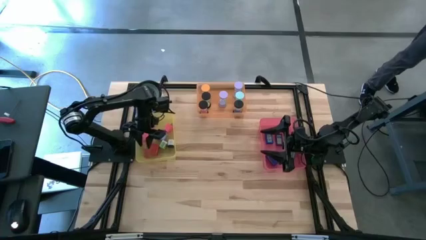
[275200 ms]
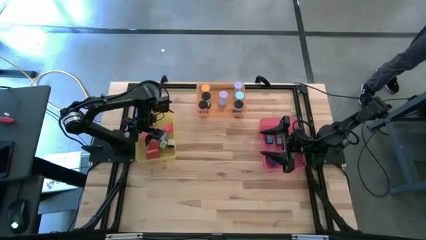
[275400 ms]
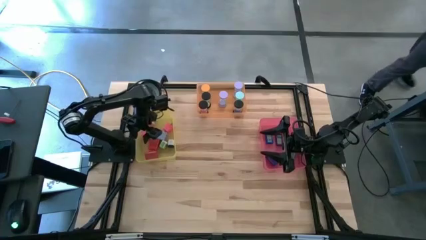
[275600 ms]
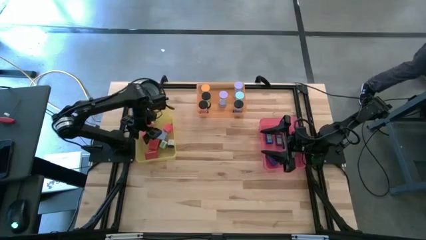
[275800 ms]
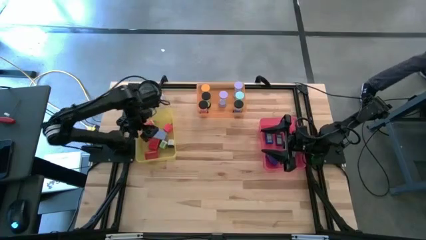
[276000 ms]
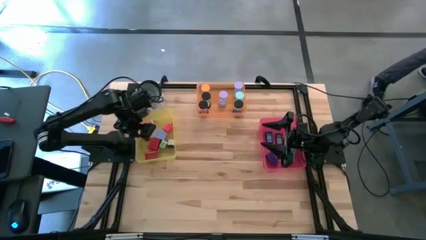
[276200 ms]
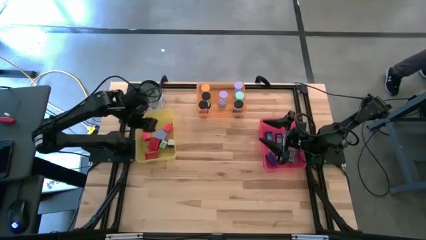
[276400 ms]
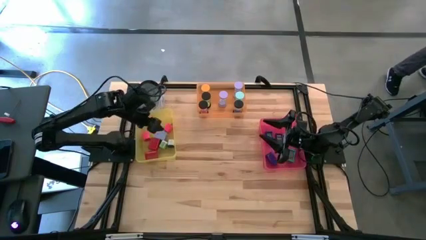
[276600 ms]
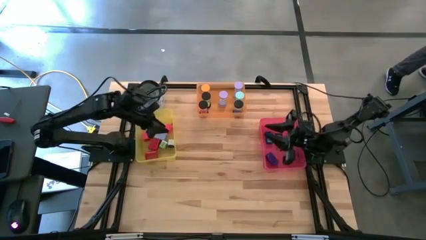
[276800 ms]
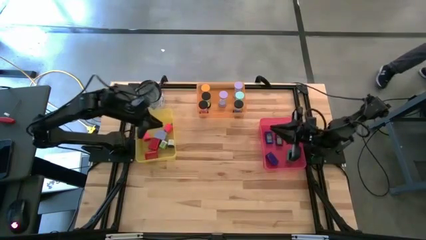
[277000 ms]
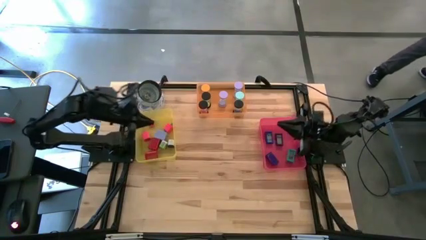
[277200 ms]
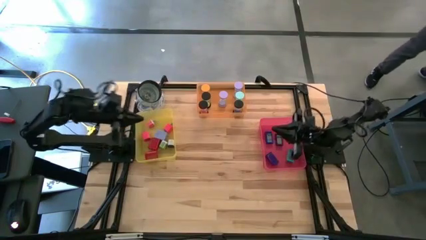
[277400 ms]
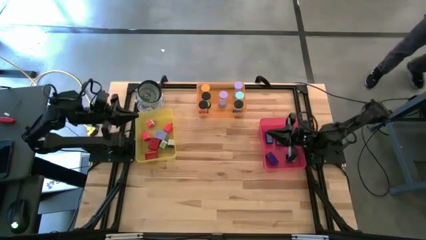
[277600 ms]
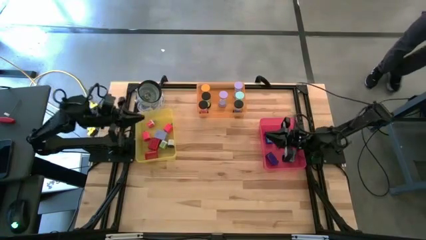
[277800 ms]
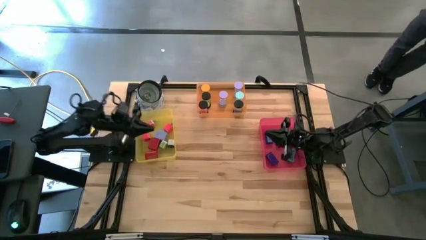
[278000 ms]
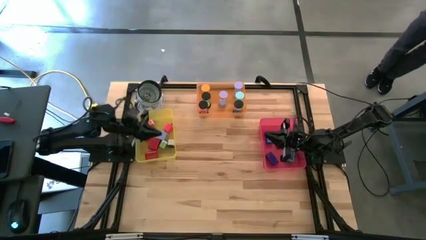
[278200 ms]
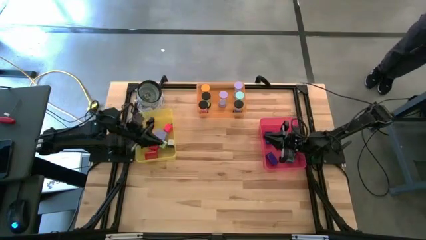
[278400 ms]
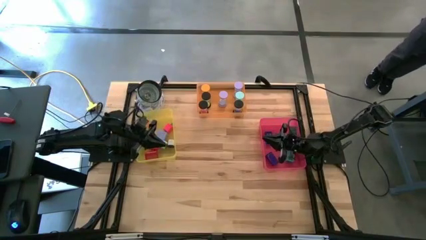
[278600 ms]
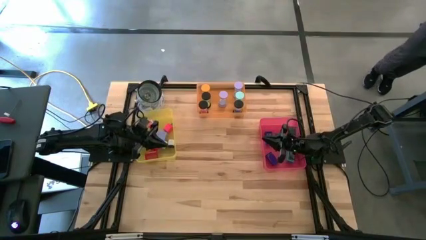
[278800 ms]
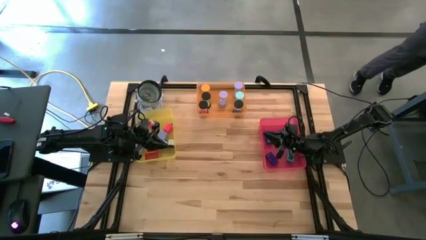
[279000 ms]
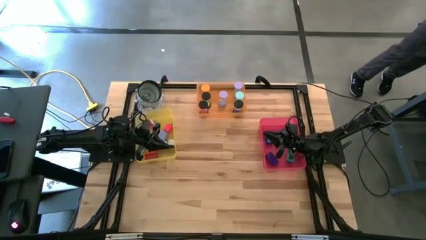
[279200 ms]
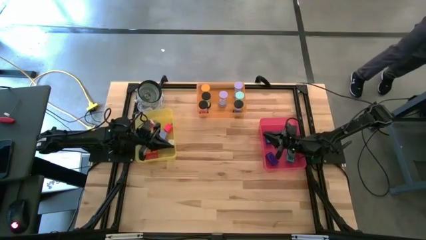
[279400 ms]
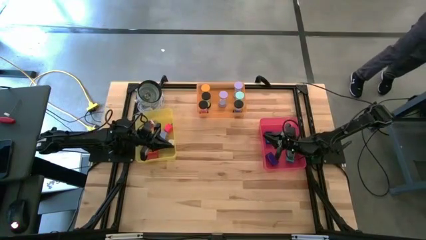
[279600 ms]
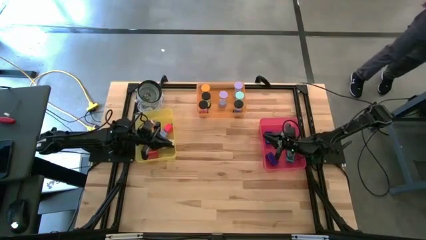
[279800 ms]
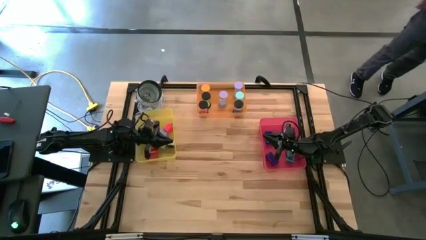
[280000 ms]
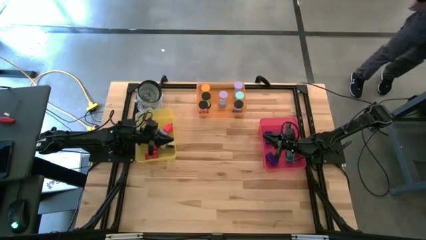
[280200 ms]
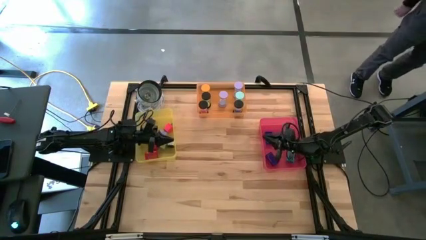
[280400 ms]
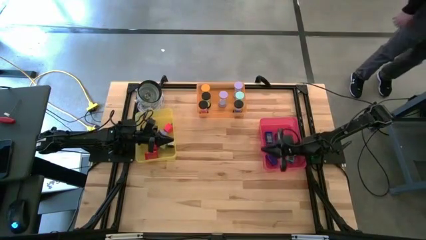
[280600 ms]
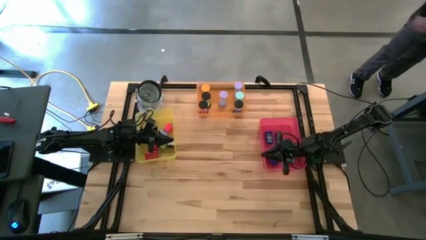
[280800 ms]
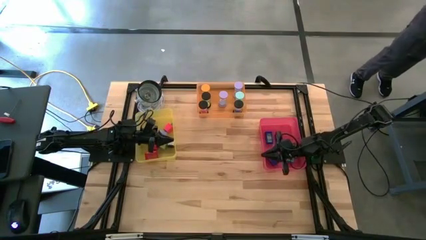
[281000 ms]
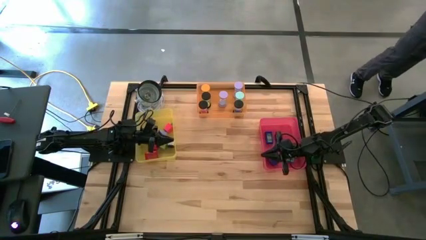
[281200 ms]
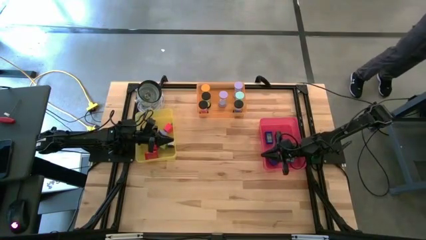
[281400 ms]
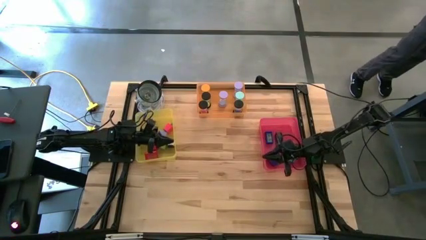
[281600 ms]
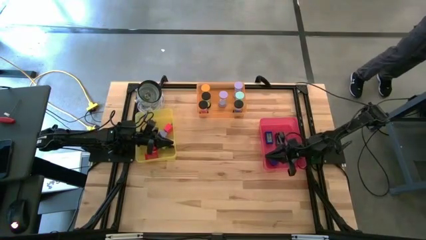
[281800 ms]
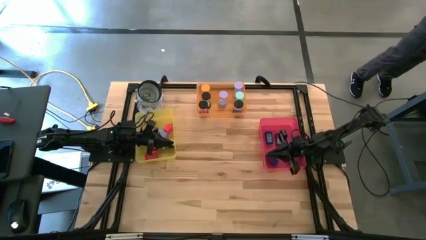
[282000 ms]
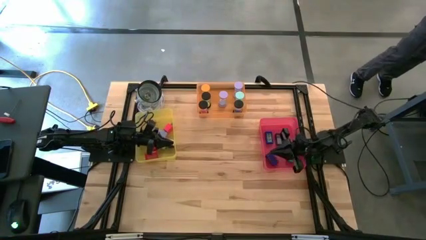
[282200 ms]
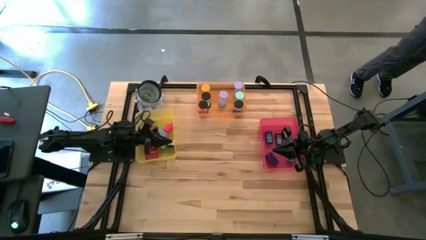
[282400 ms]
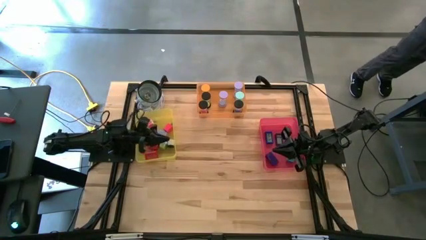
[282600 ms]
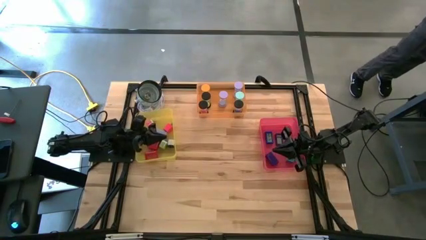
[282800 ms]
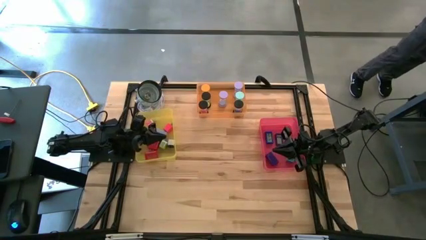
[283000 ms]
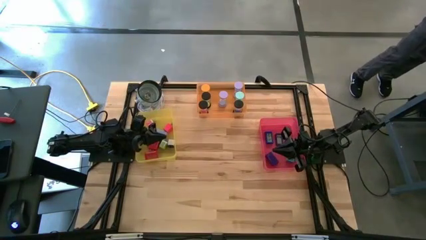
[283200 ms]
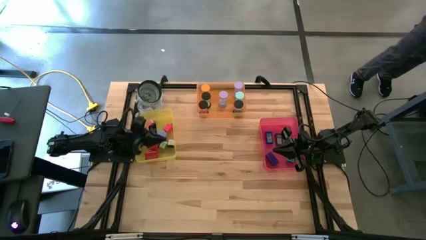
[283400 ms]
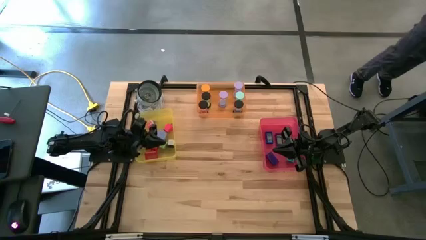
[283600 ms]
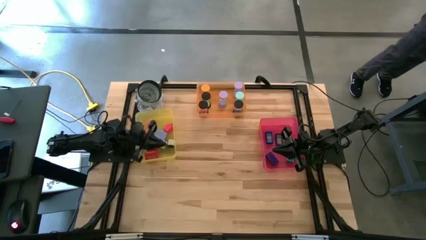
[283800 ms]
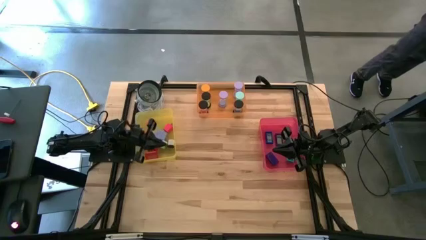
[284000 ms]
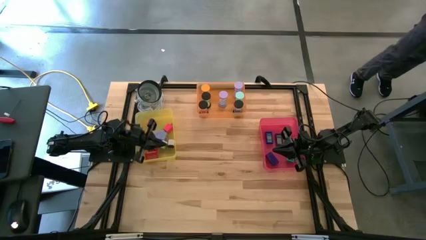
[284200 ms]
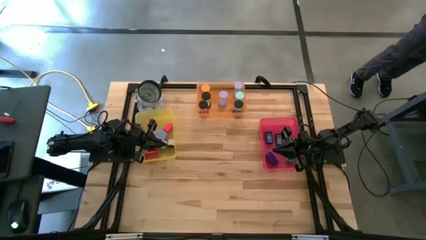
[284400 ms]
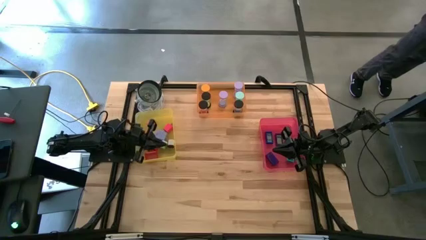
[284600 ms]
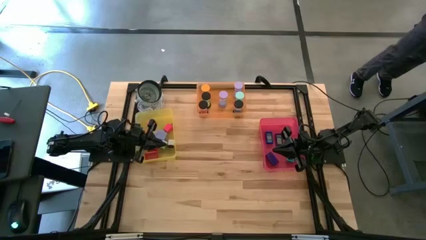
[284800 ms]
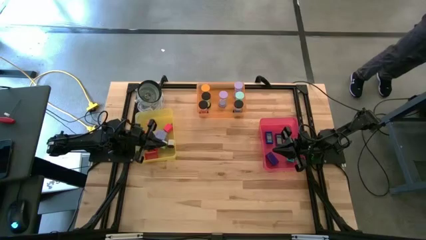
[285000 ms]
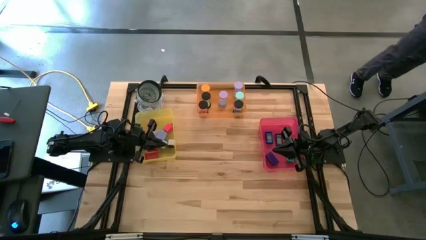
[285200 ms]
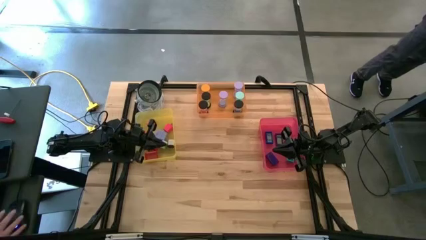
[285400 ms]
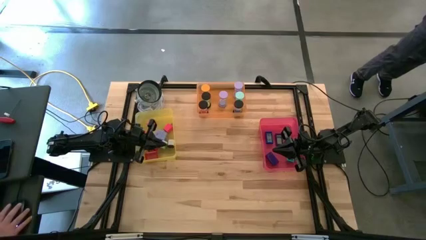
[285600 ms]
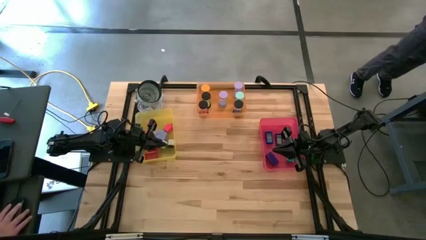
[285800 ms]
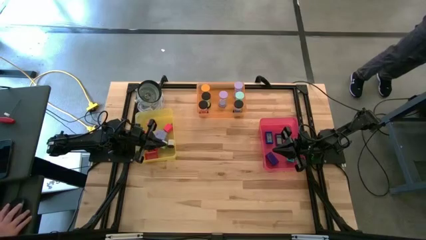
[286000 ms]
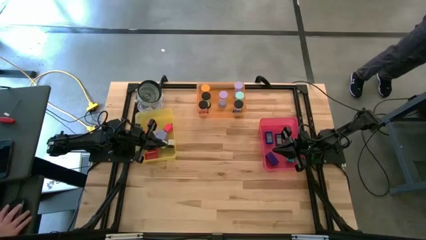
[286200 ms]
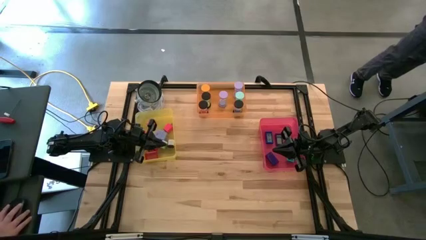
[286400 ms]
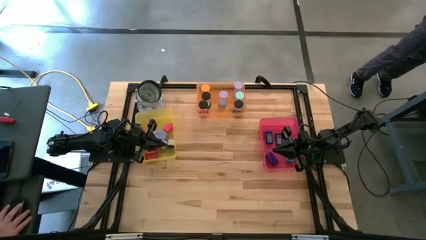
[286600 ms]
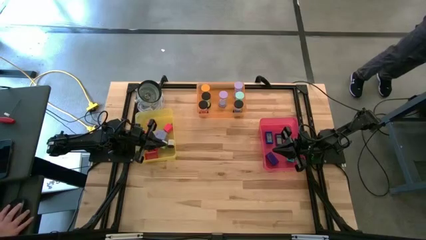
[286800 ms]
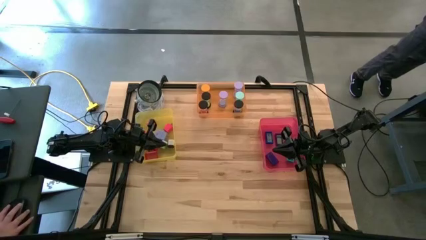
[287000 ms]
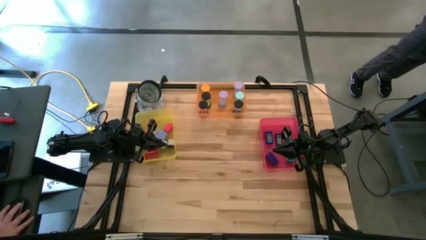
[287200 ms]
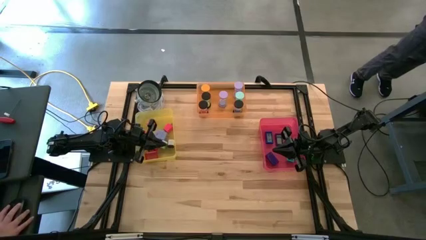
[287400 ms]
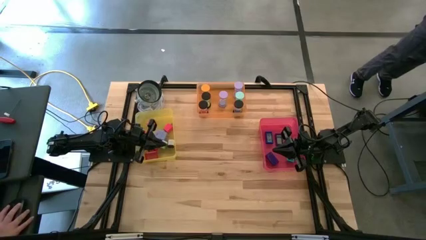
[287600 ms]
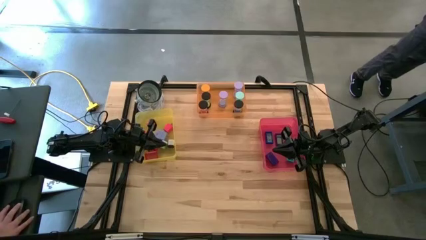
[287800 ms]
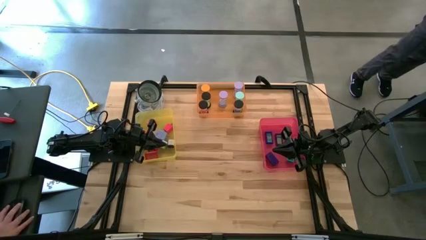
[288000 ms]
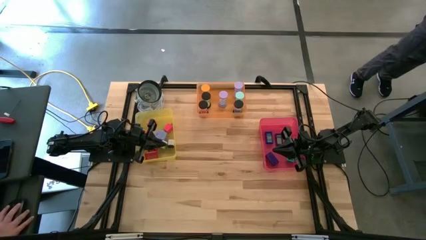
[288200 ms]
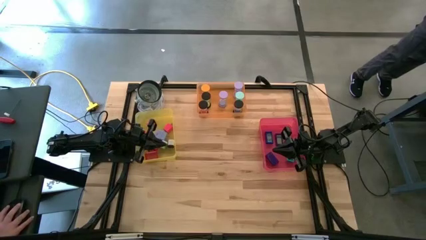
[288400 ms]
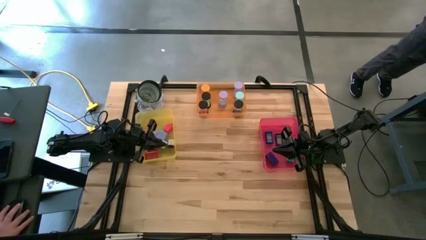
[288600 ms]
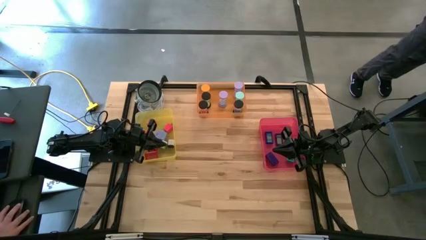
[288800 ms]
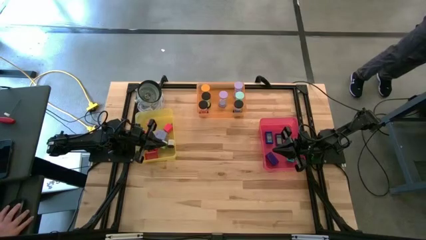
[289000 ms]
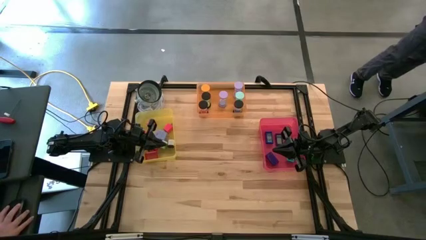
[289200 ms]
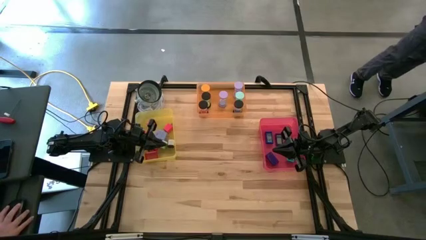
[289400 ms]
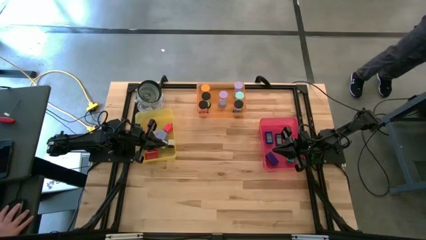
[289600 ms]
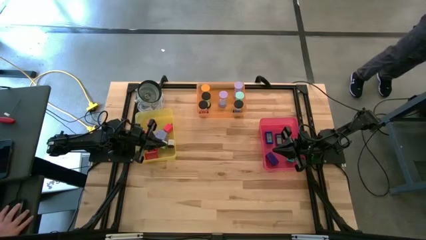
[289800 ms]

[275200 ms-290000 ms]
Task: Pick & Place Office items
Return to Home Position

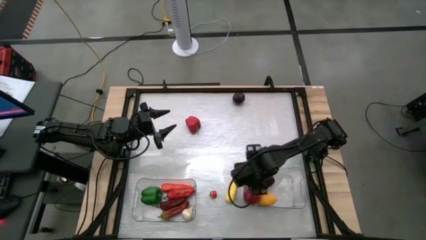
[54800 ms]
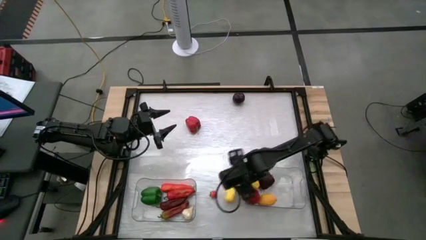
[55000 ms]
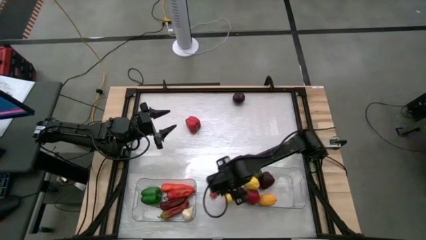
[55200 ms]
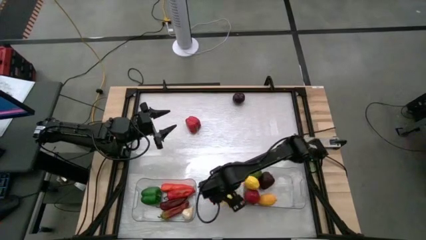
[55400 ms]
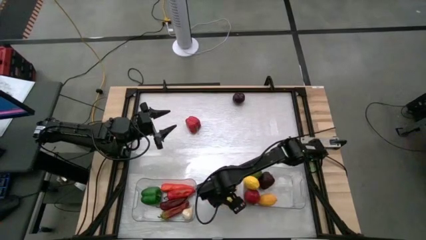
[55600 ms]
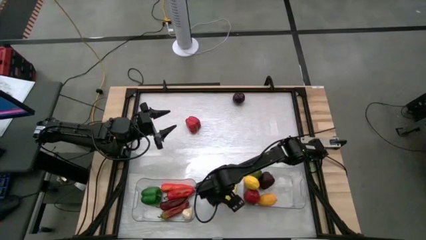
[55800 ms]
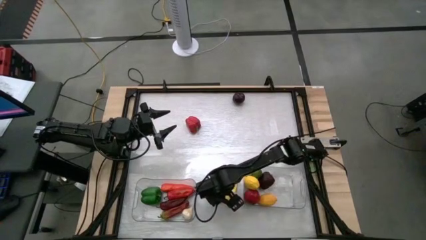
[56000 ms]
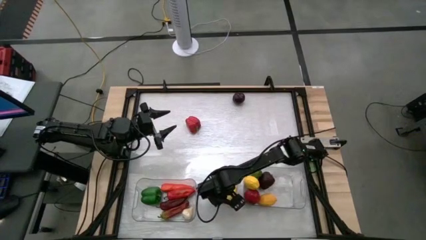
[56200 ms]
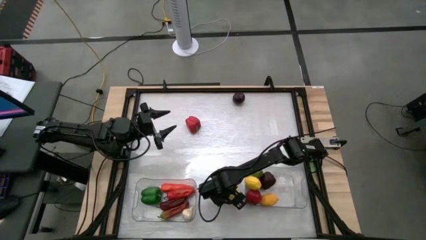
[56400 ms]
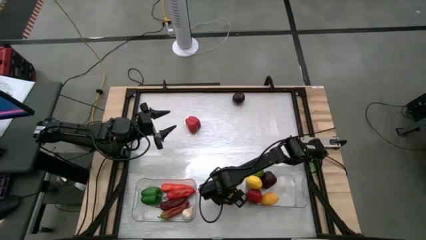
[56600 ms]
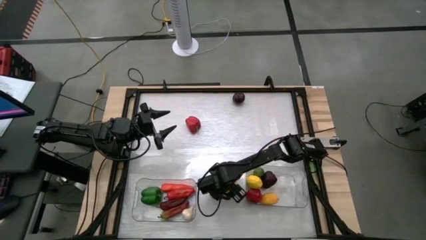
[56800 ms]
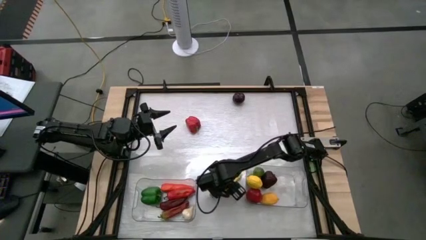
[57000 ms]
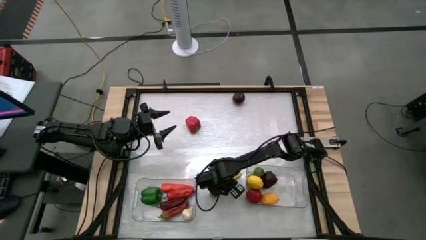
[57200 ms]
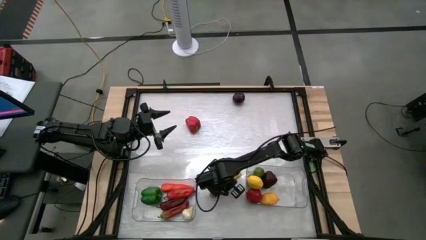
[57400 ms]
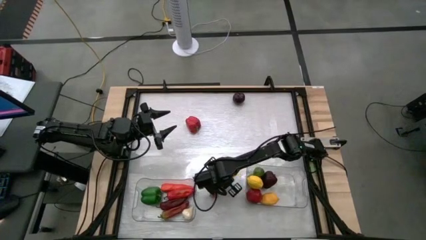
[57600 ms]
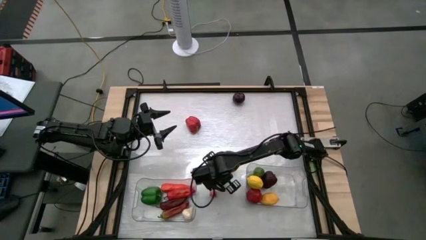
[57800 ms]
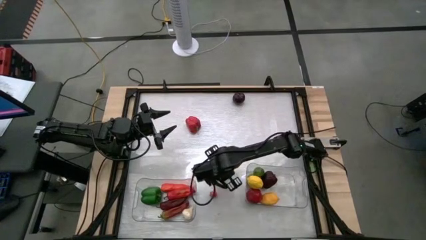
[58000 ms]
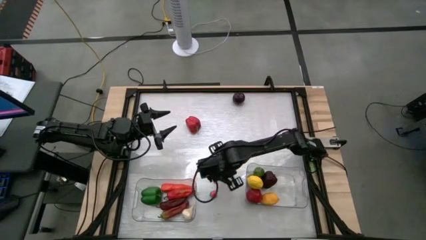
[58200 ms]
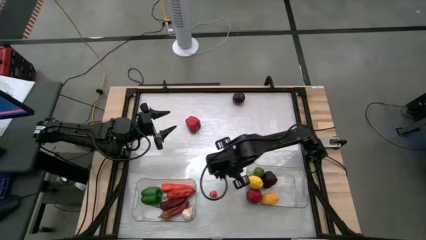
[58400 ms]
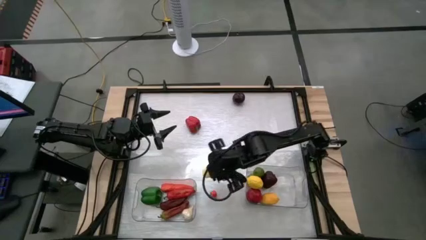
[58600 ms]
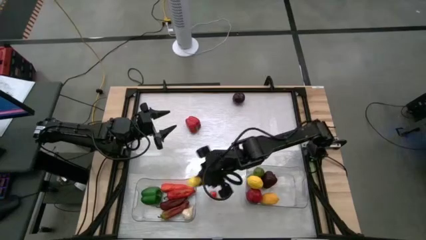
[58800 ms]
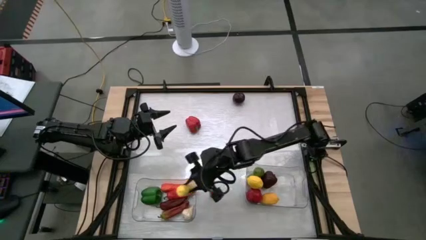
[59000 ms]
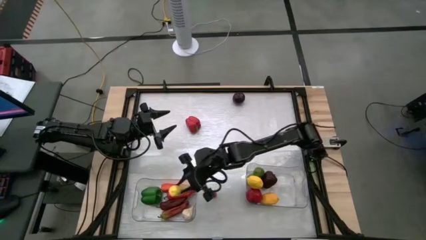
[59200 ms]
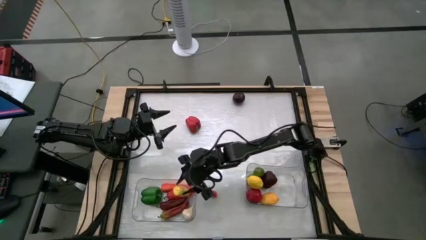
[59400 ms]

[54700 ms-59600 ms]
Task: Sort produce into baskets
Put the yellow bell pepper into the left transparent bin
